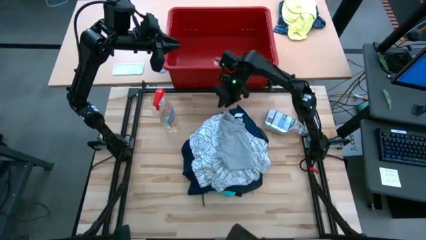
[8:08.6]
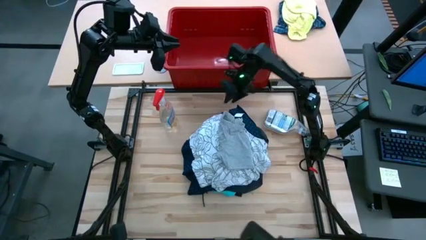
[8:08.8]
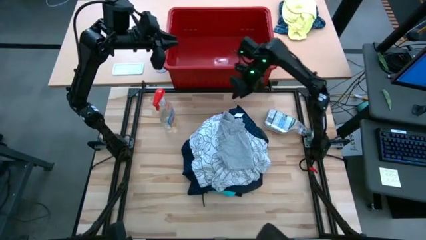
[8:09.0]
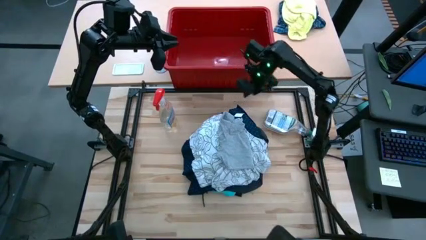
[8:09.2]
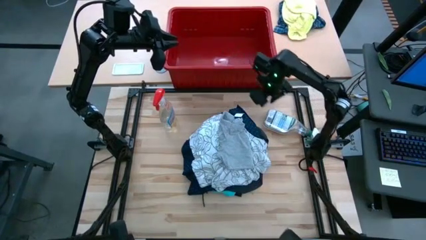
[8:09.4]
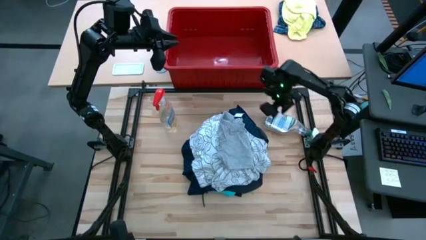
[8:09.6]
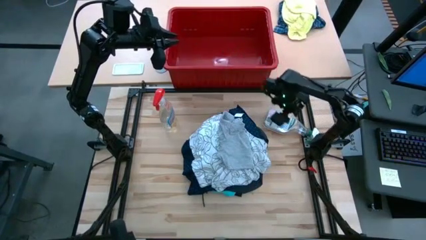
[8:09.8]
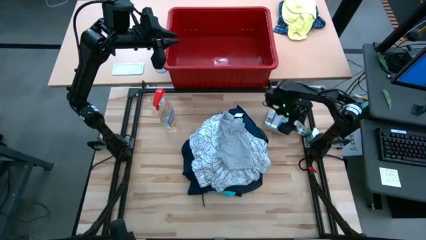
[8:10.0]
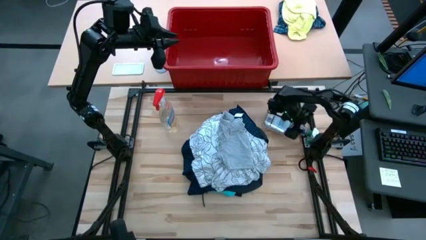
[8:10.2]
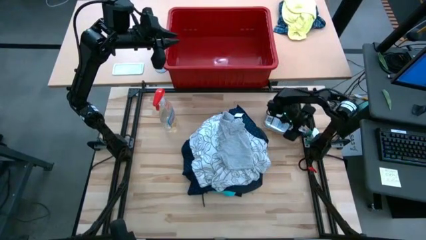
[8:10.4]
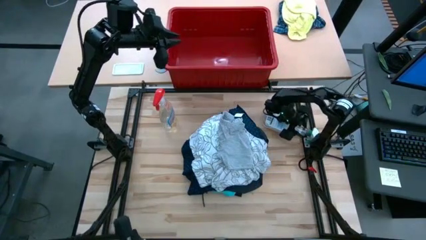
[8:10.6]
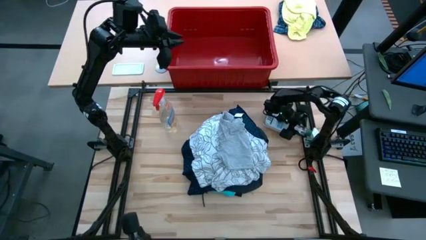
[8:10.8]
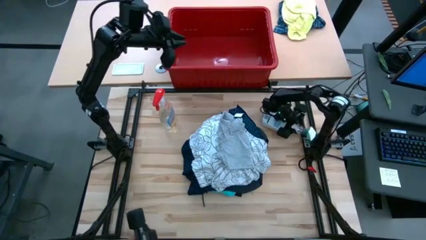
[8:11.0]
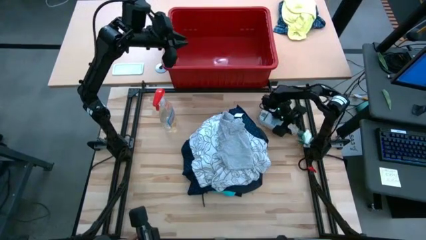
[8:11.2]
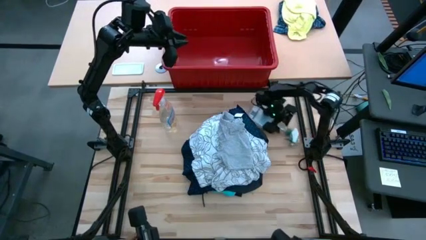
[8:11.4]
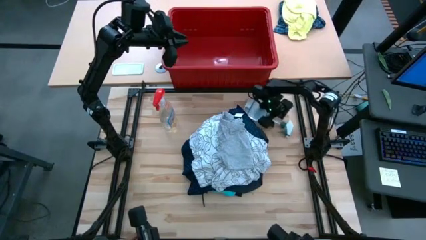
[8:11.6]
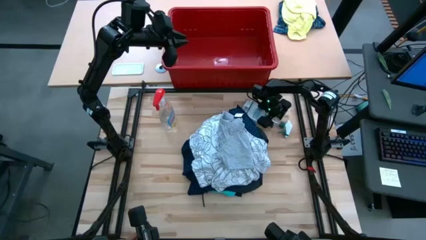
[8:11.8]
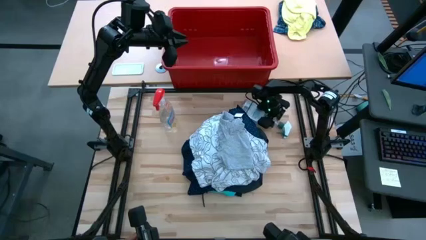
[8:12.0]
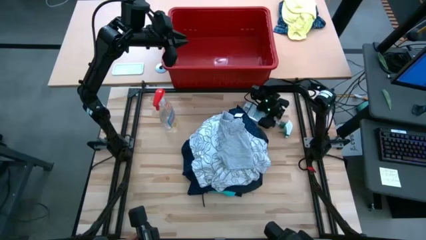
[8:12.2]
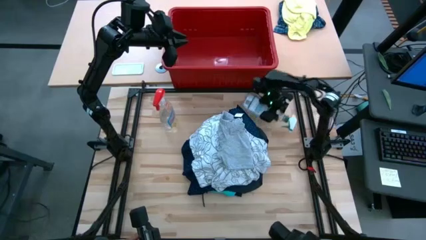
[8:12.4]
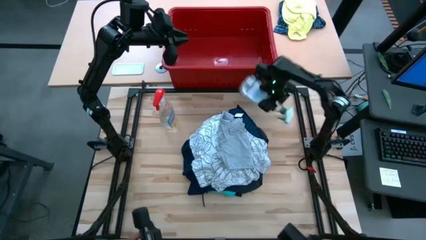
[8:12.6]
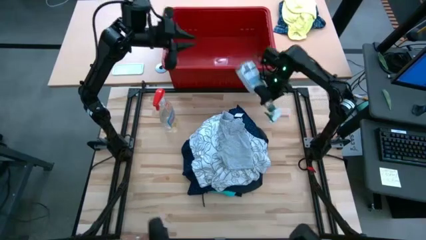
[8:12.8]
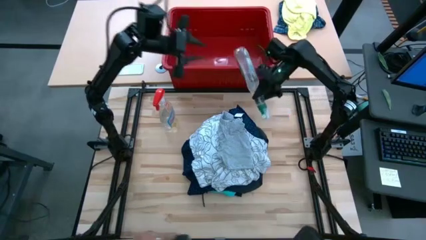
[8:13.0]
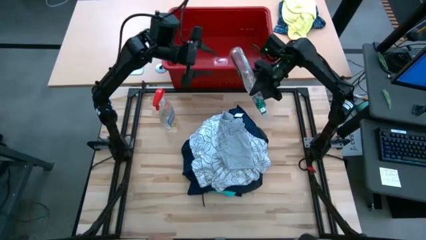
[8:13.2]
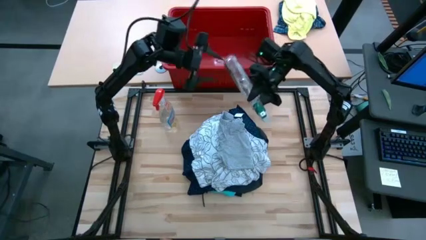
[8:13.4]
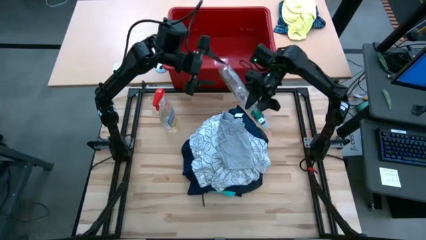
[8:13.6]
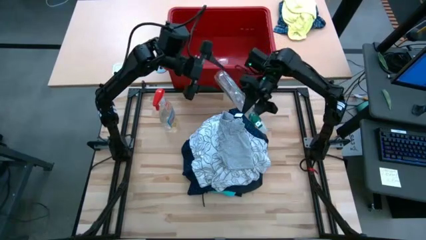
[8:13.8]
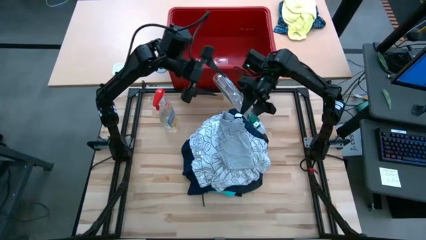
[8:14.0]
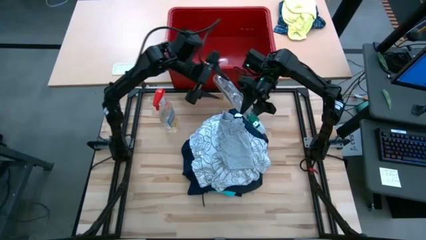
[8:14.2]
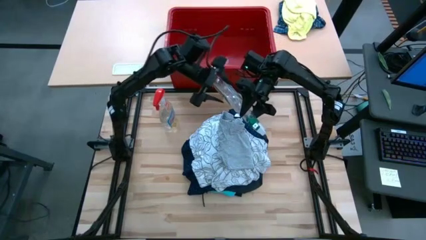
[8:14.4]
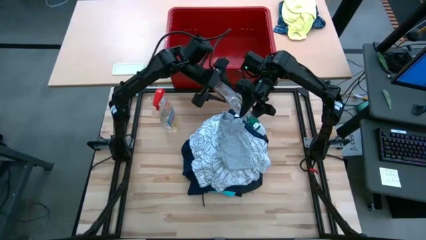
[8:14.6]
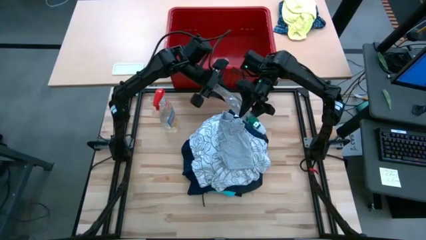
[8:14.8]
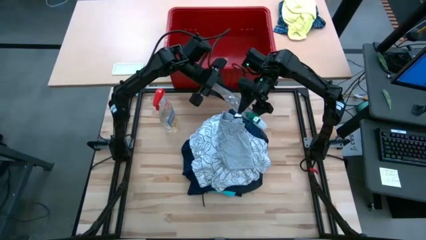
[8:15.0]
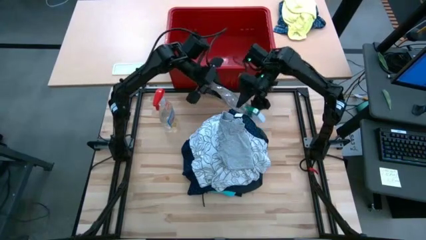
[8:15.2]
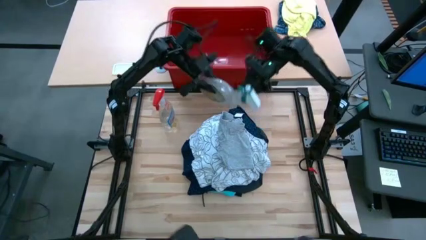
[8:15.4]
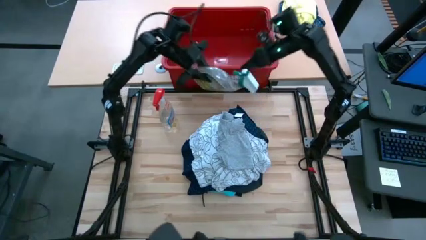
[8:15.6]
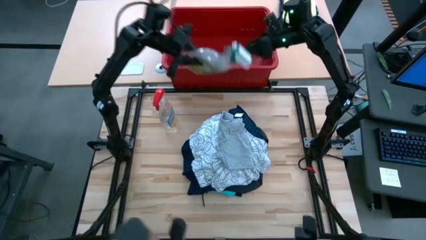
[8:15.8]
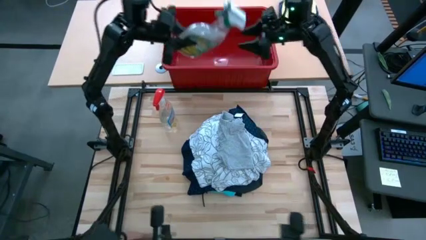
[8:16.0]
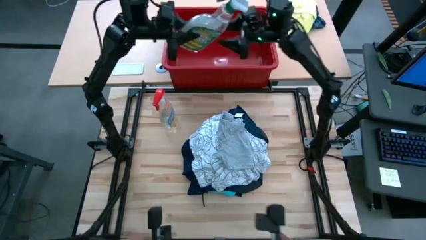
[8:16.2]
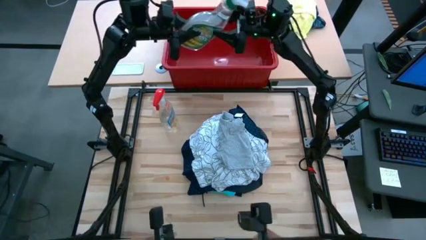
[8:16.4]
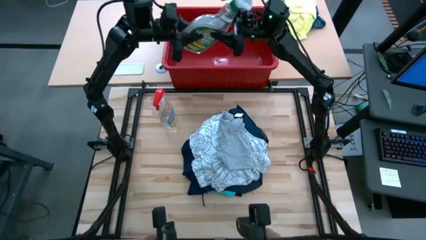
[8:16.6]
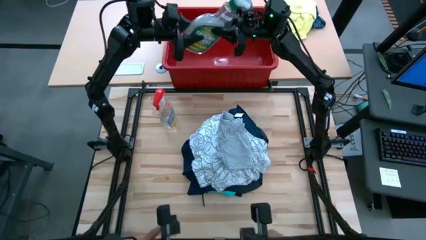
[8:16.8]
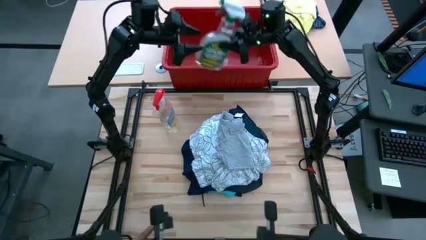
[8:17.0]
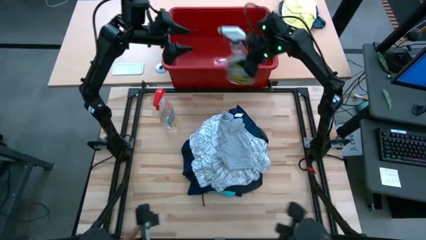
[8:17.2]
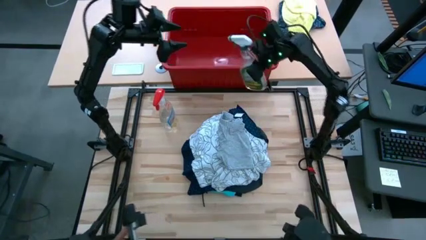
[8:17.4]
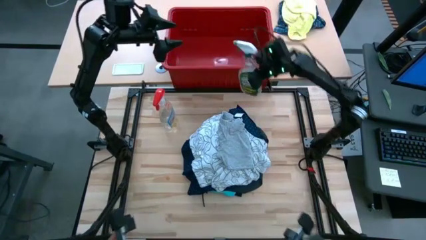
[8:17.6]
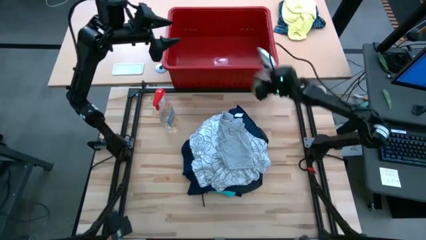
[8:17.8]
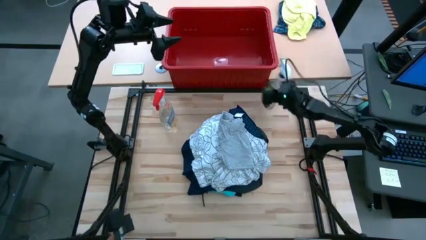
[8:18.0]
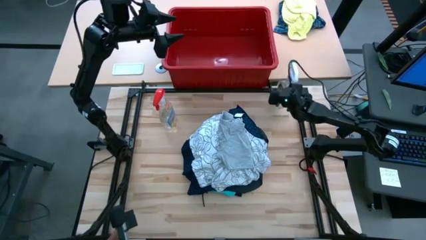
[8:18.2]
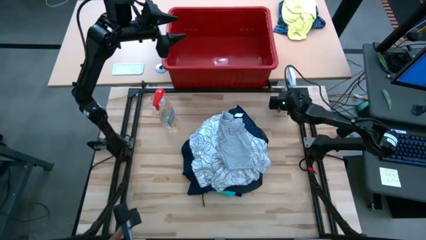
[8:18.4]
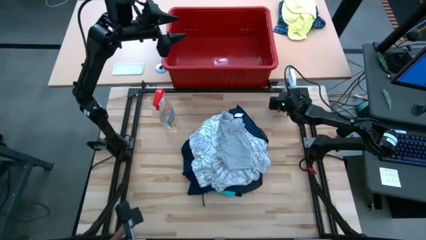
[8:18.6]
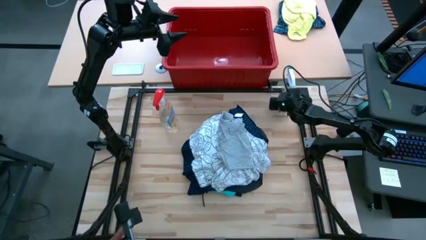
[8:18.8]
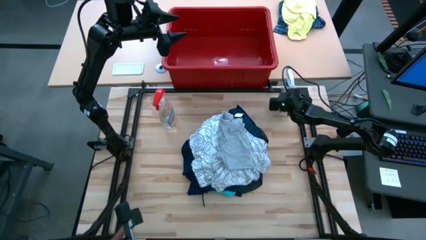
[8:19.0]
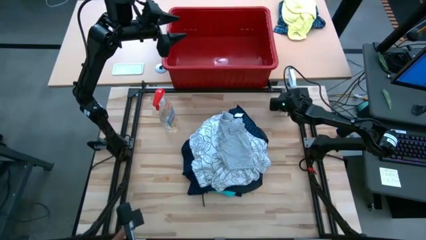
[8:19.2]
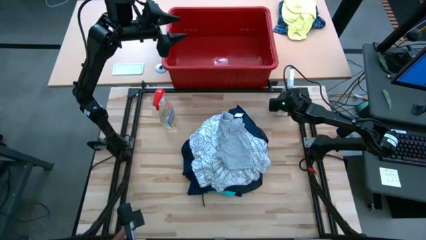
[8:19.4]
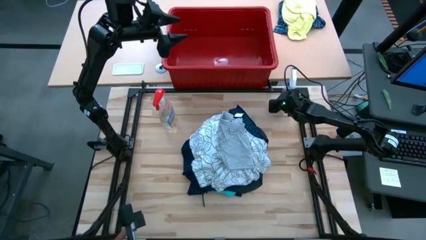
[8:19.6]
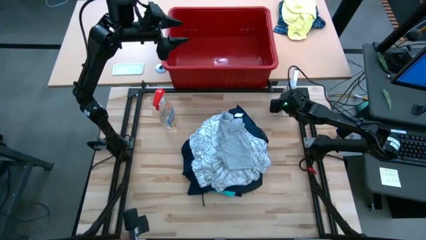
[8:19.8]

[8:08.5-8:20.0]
Task: Fold Laundry from Bin
Adjust the right spray bottle
